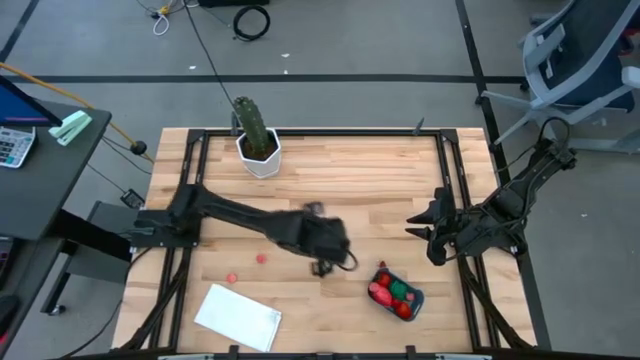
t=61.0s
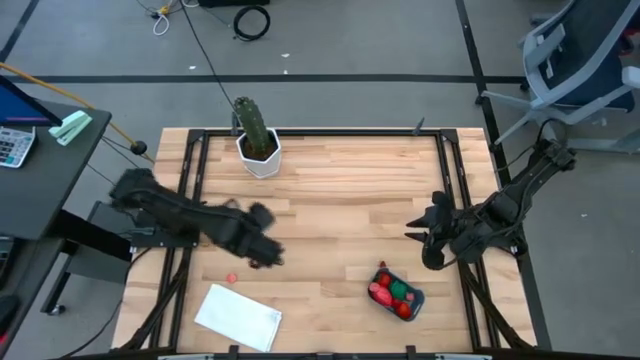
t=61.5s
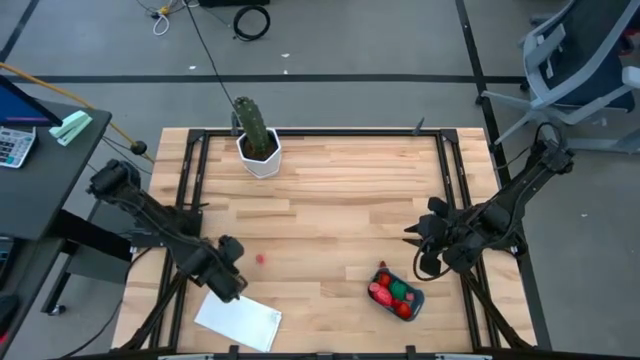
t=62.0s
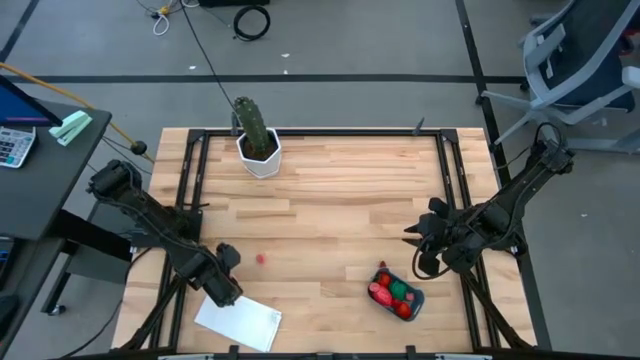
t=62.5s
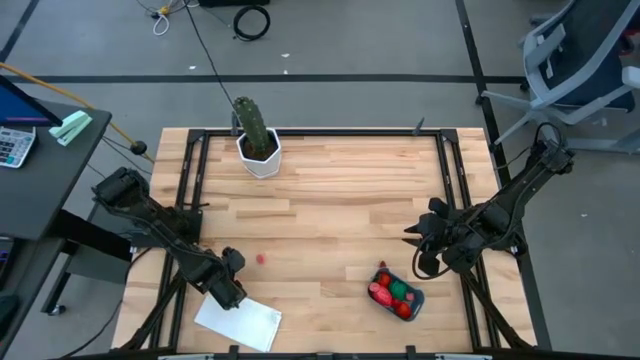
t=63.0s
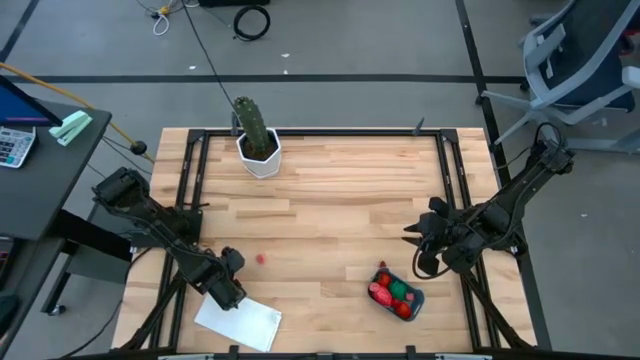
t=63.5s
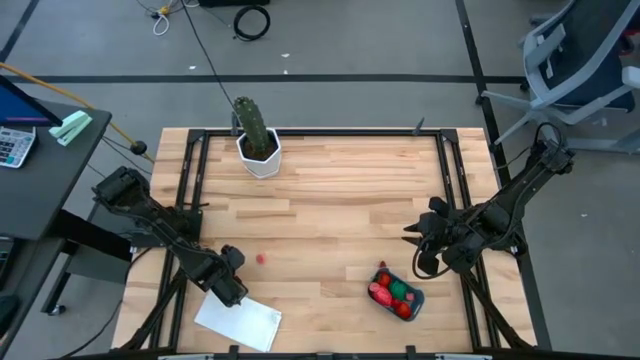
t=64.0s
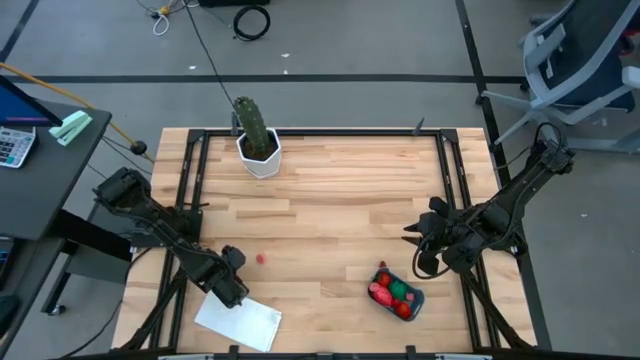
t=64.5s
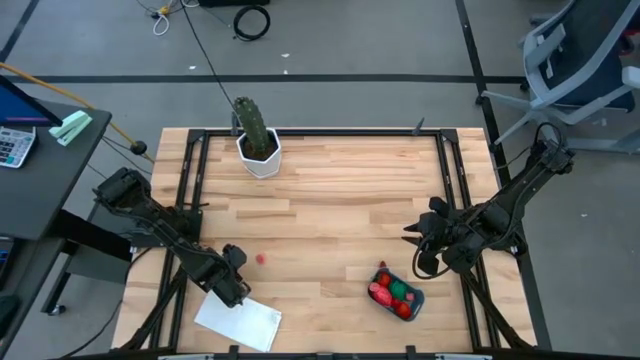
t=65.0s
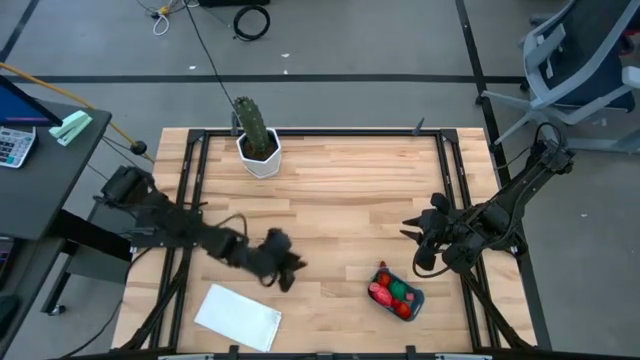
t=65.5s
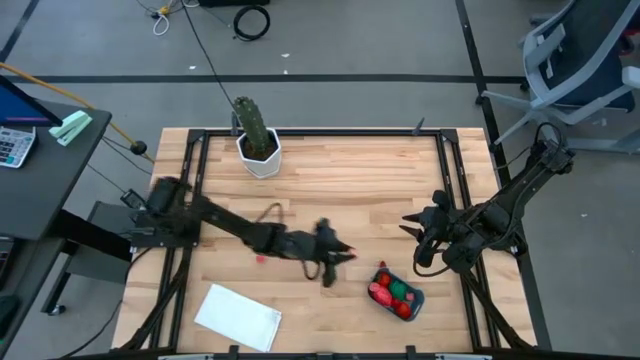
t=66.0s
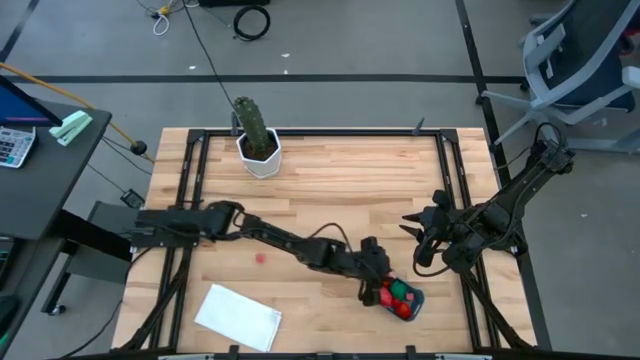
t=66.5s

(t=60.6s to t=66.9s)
Task: Pick and placing Produce into tupperware
Put the peach into the bin

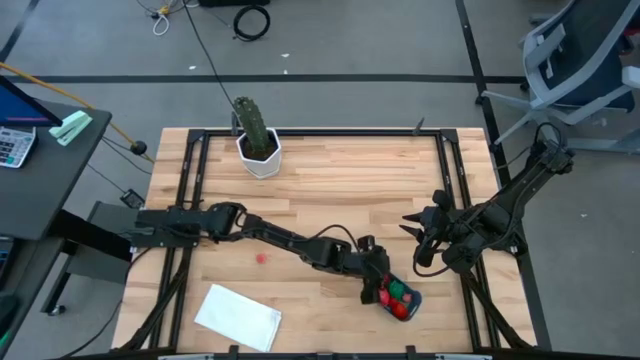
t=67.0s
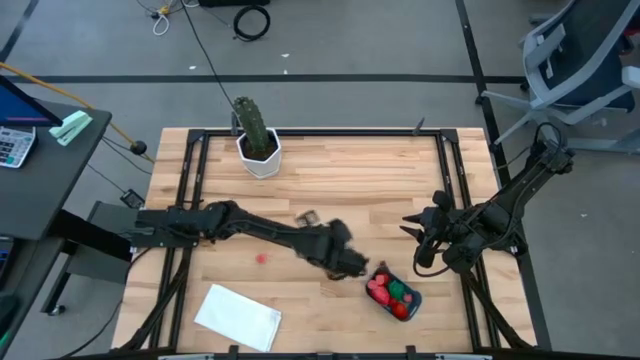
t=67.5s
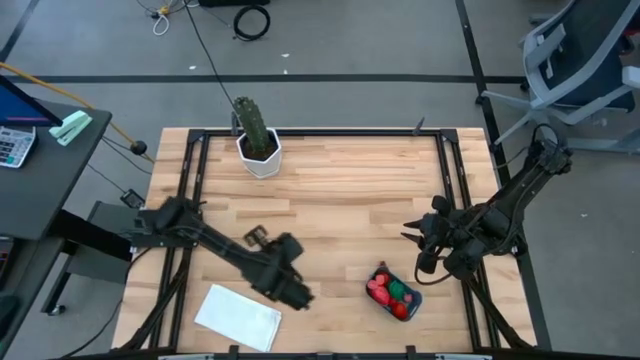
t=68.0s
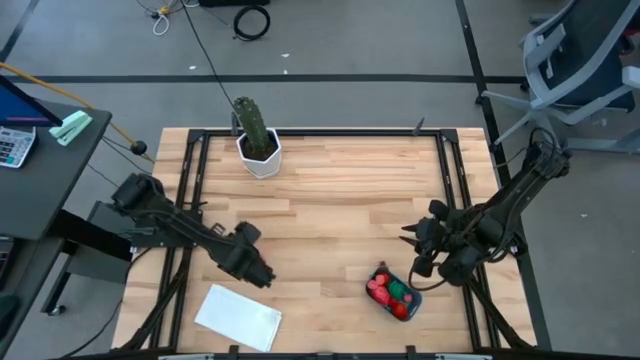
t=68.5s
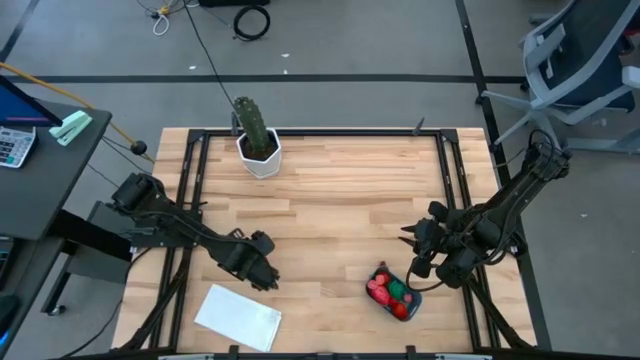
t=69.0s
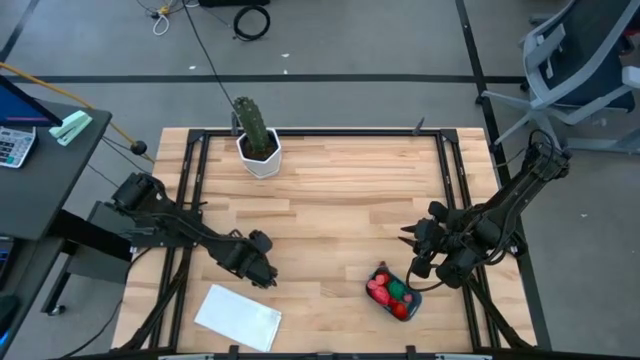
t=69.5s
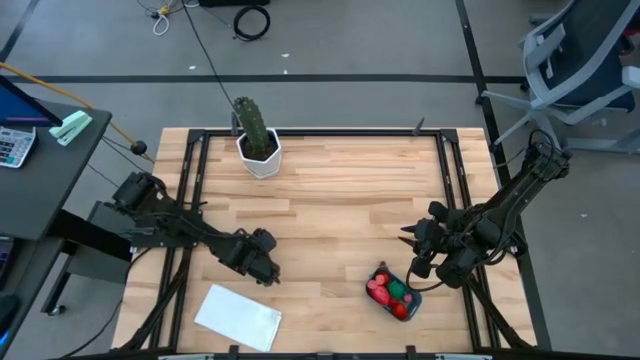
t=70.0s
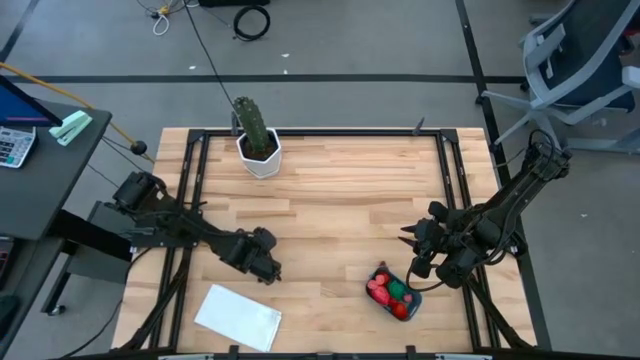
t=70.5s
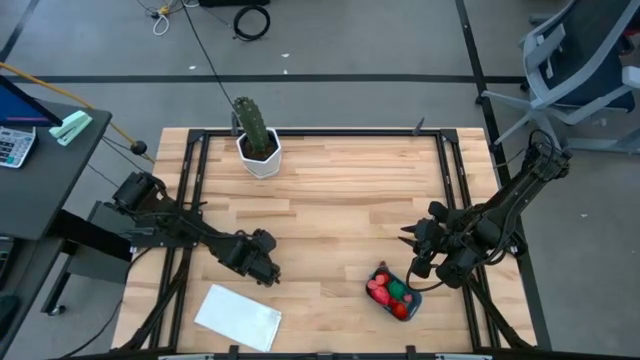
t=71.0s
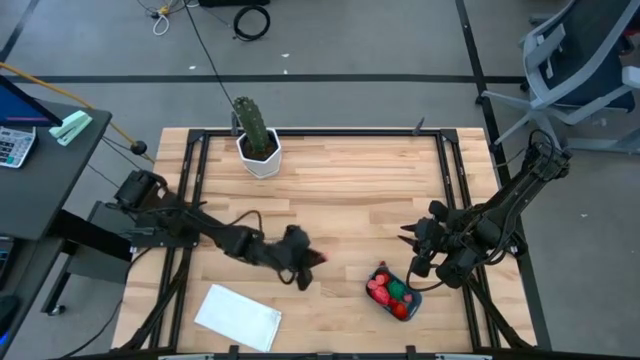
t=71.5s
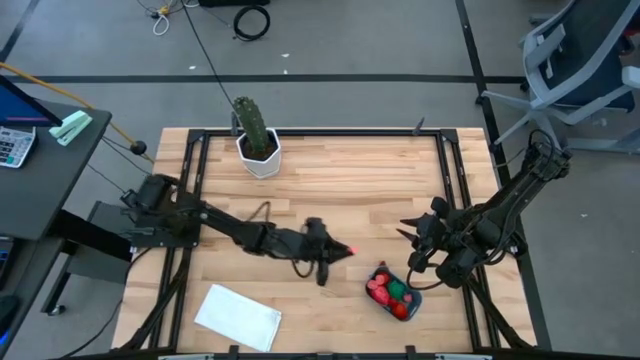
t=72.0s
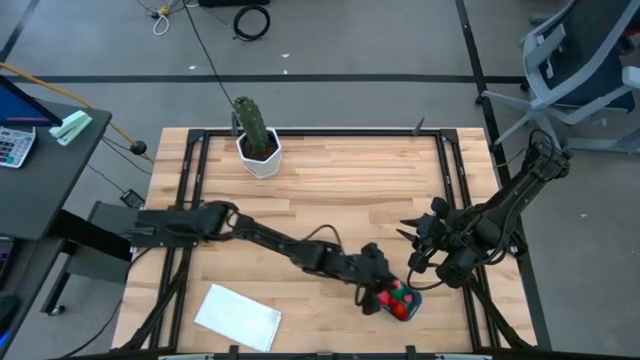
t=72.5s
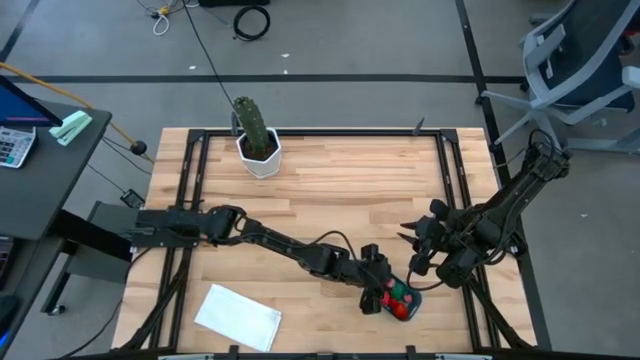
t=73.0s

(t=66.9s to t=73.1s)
Put the peach into the bin

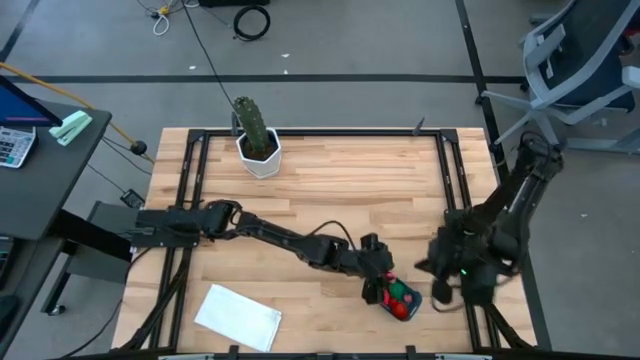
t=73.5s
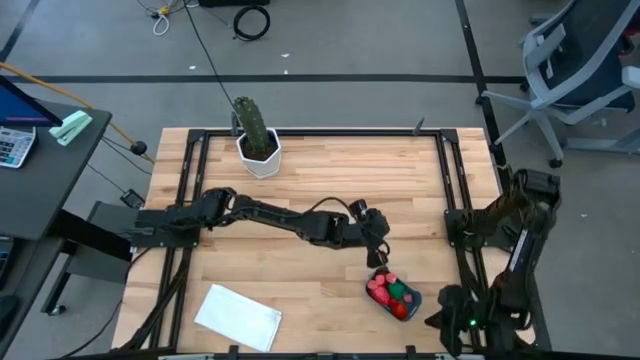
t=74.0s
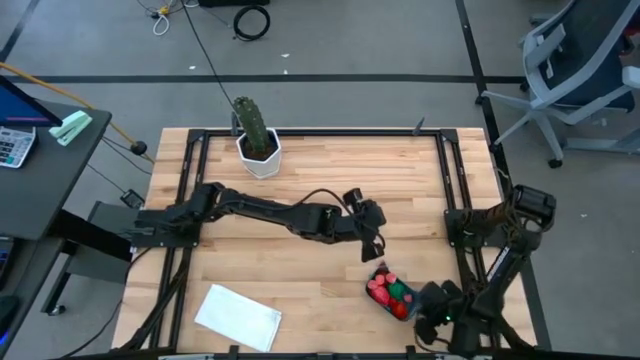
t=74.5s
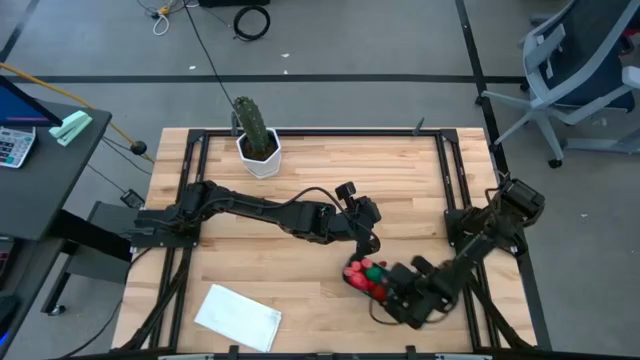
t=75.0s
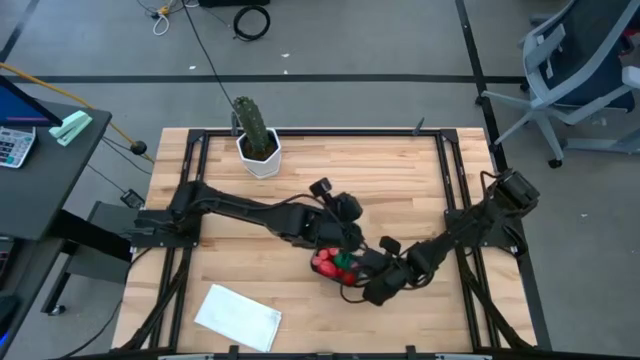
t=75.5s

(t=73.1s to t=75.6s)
Adjust the bin to the left

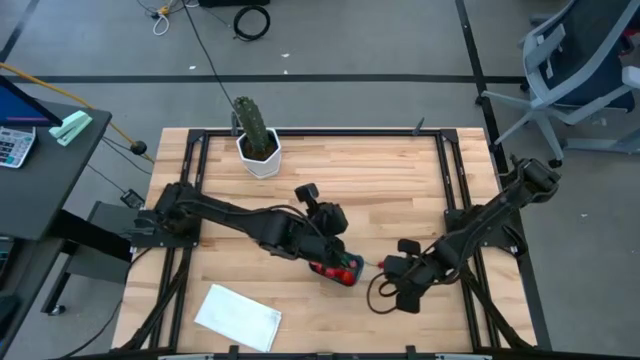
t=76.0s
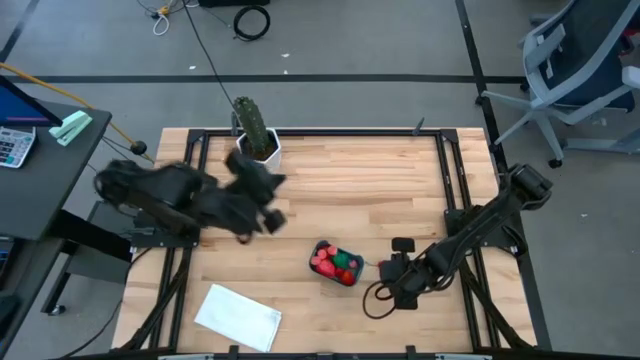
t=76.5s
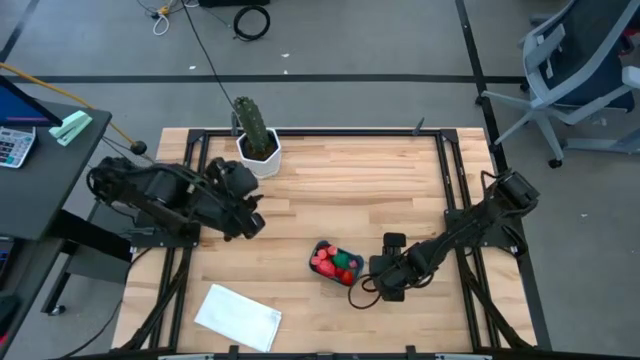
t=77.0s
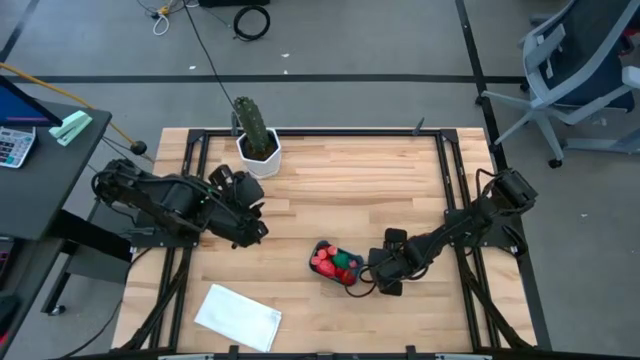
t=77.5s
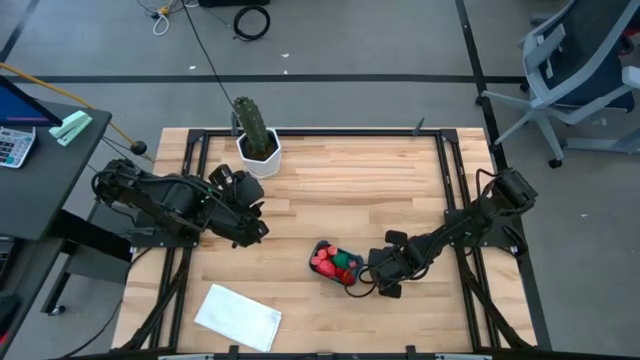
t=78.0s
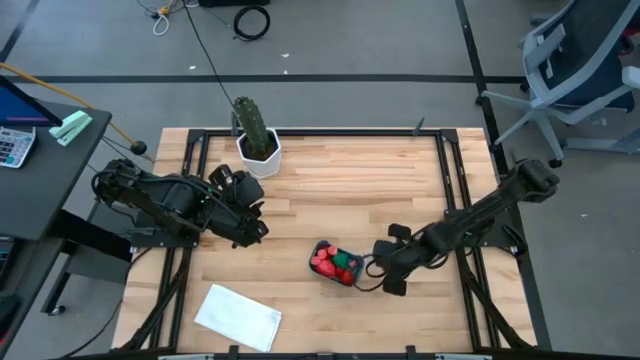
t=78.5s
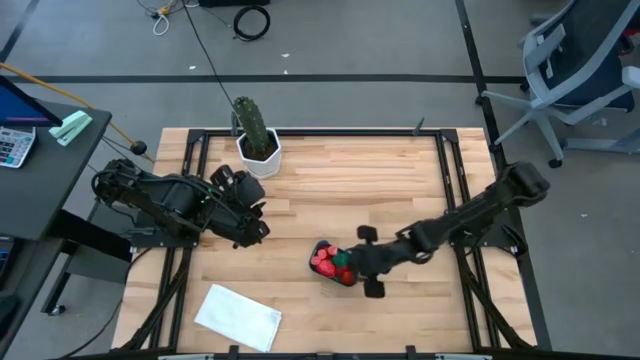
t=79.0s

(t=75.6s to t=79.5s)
Put the chili pepper into the bin

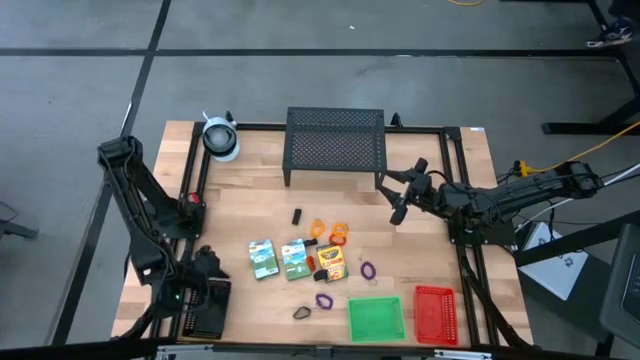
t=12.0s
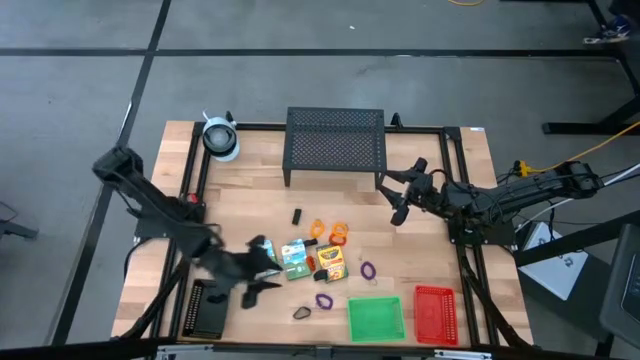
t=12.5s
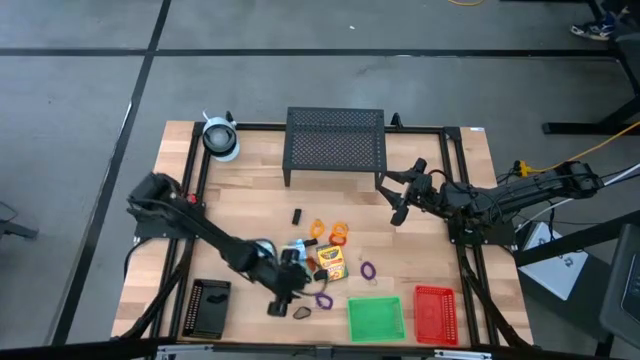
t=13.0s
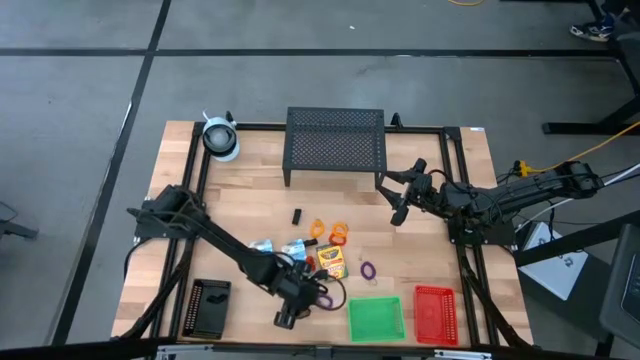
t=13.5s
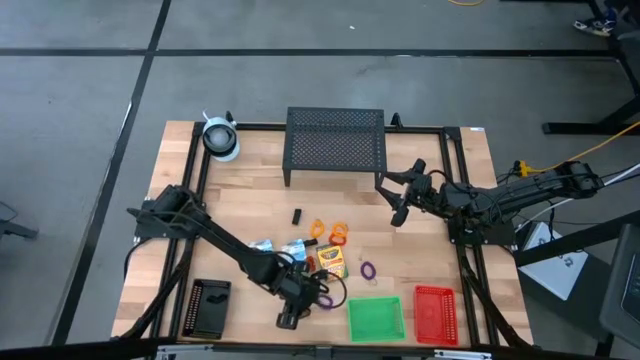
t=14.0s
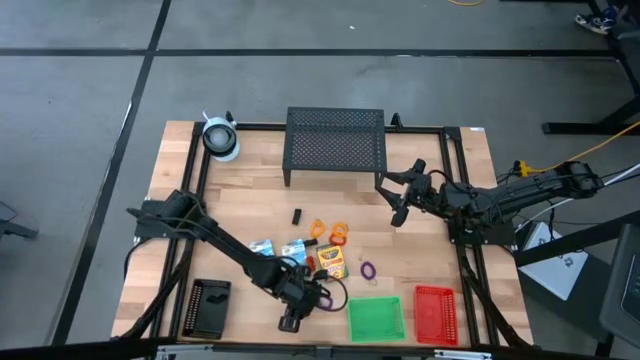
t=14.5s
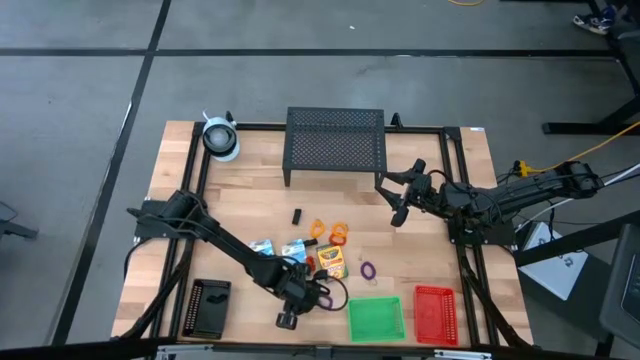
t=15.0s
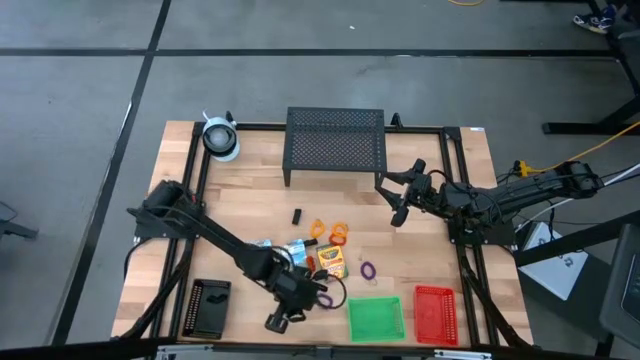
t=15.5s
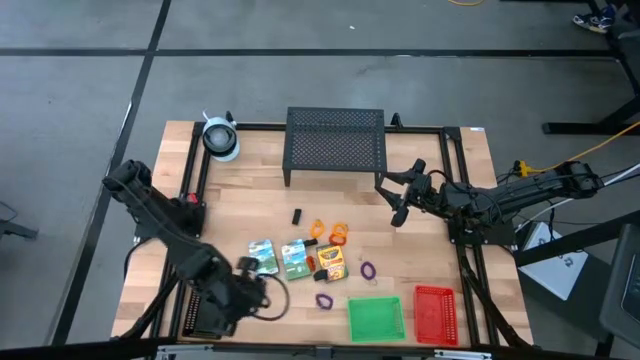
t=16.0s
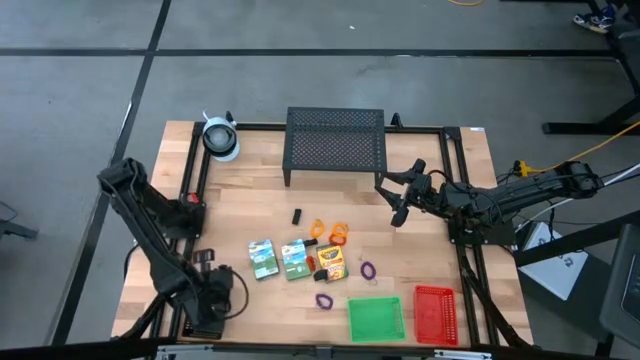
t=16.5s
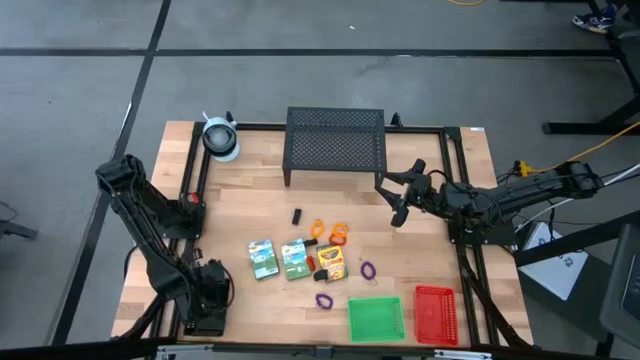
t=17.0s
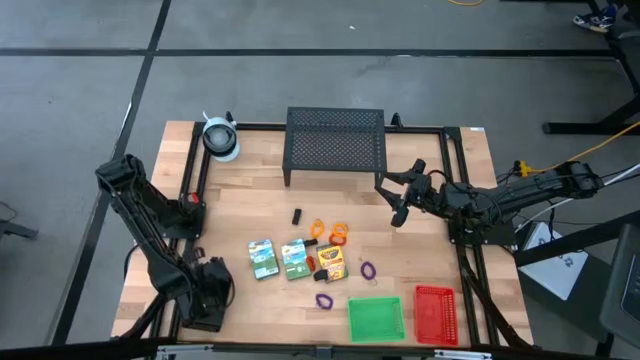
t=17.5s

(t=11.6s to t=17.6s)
Task: Pick & Place Office Desk Supplies
Put the black rubber band into the black bin
